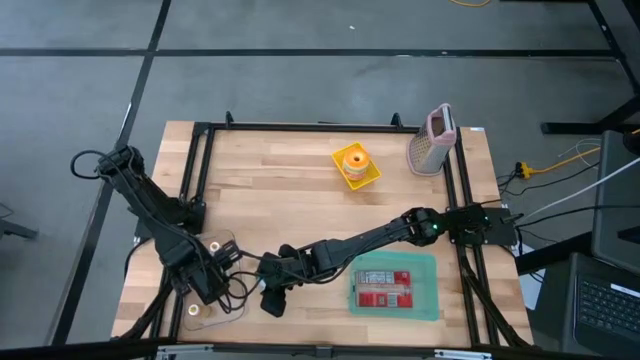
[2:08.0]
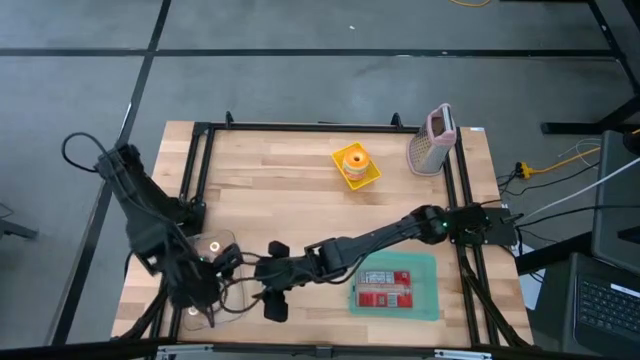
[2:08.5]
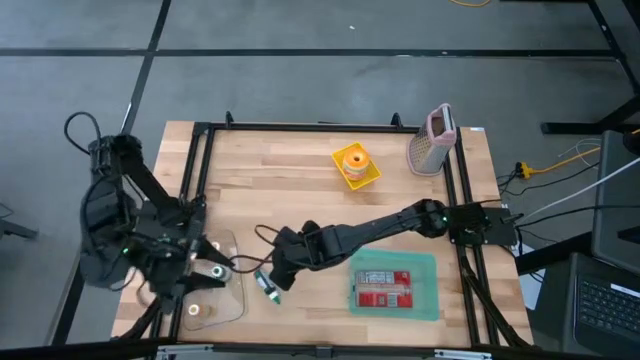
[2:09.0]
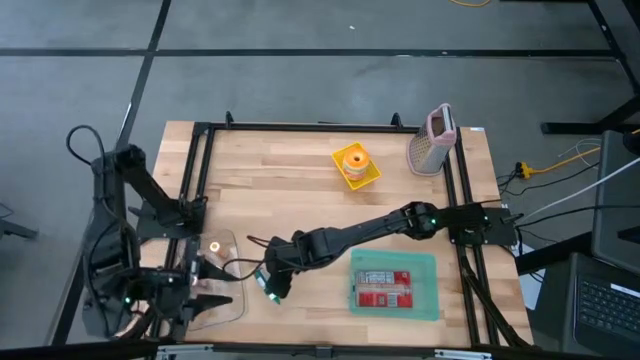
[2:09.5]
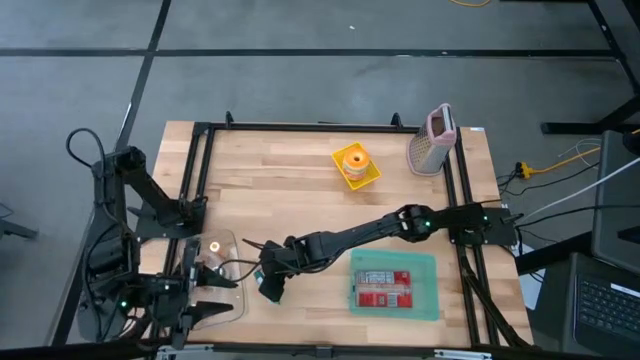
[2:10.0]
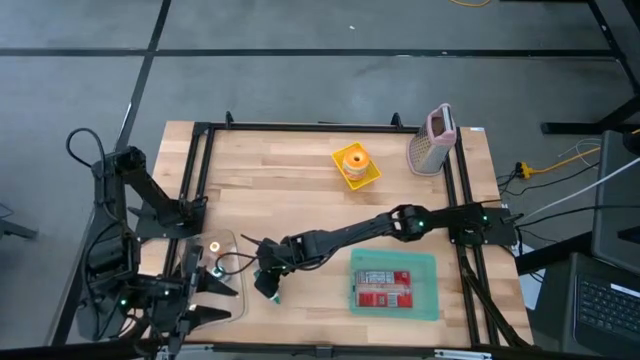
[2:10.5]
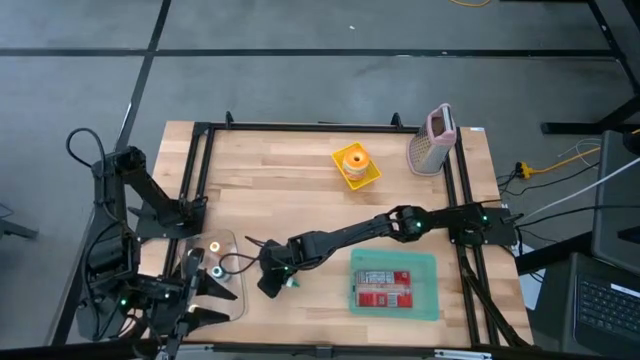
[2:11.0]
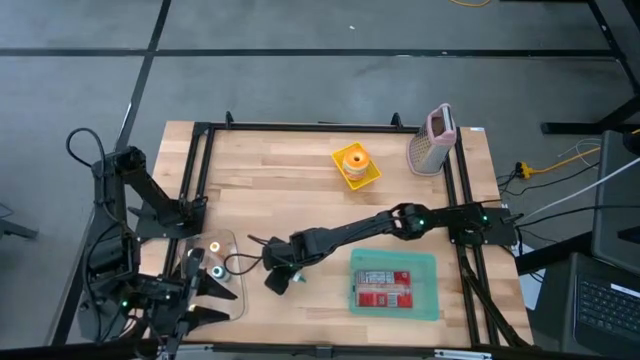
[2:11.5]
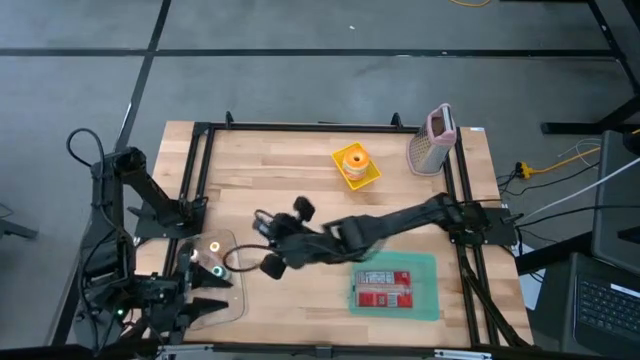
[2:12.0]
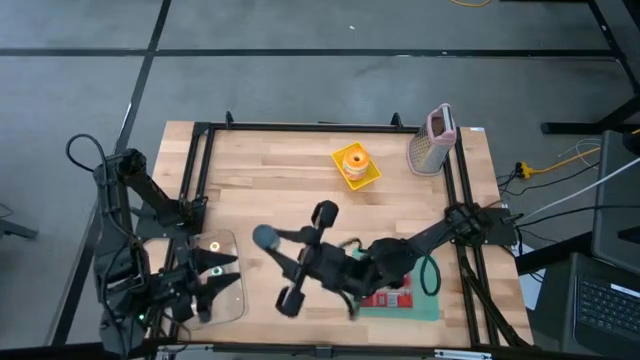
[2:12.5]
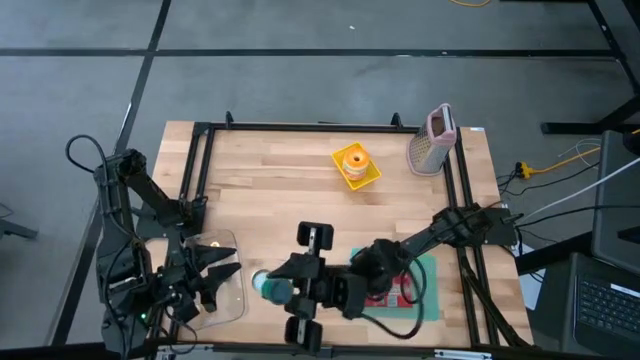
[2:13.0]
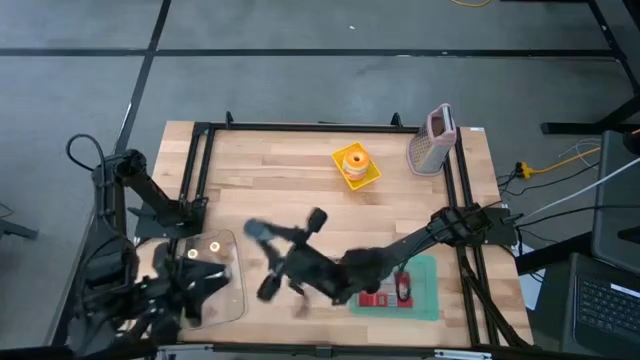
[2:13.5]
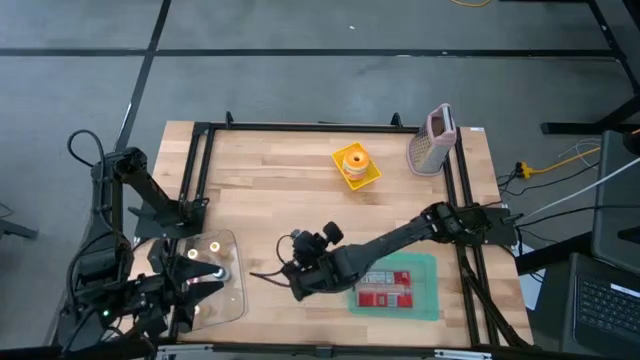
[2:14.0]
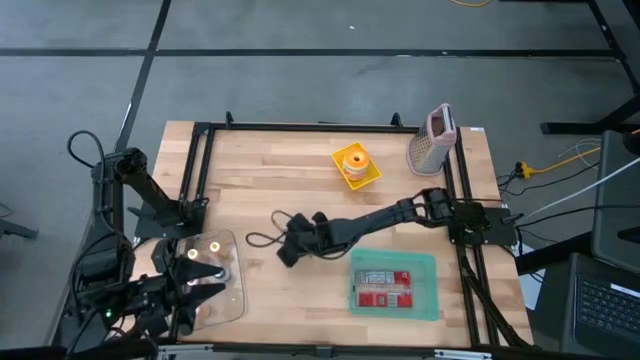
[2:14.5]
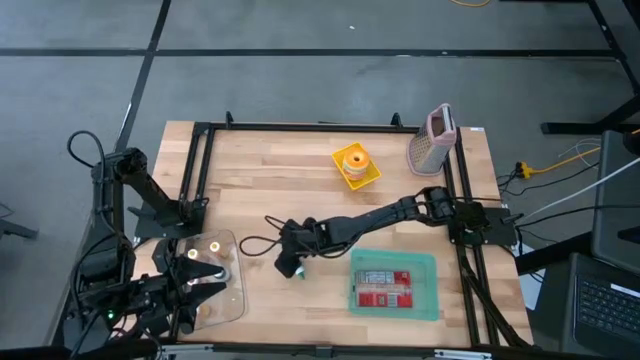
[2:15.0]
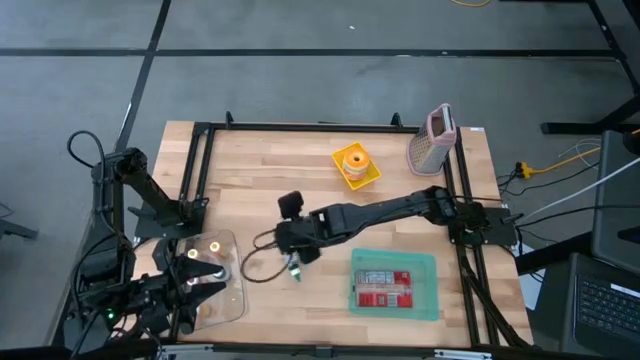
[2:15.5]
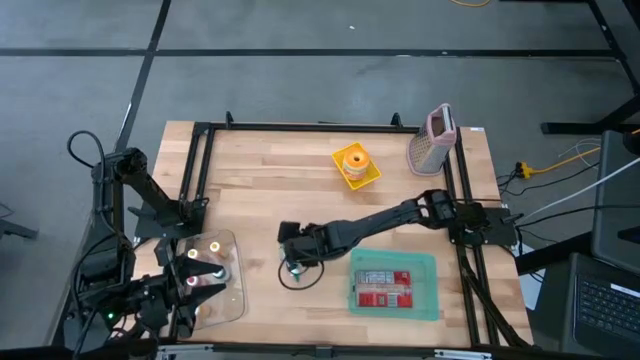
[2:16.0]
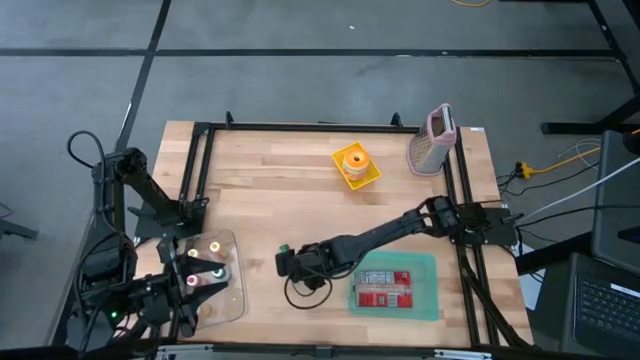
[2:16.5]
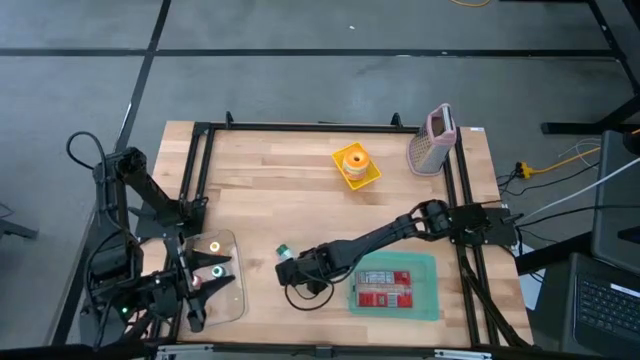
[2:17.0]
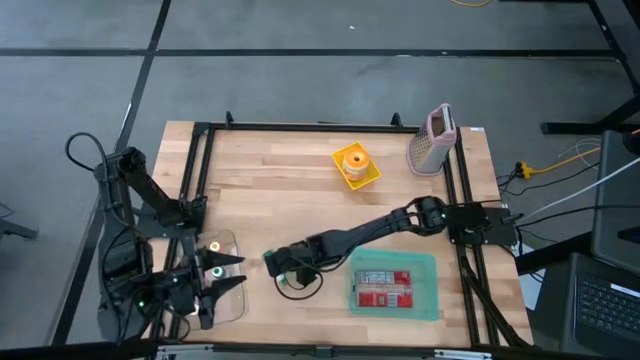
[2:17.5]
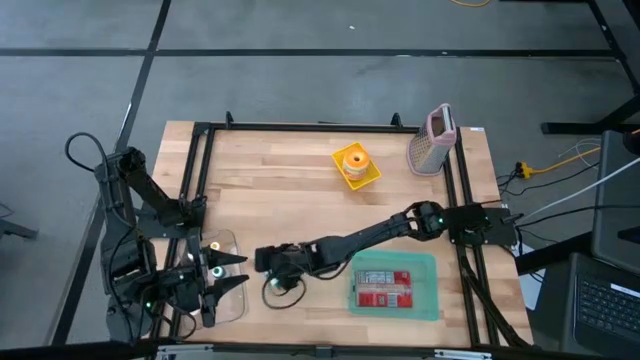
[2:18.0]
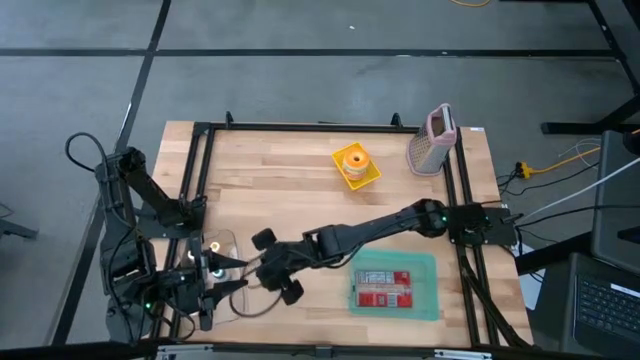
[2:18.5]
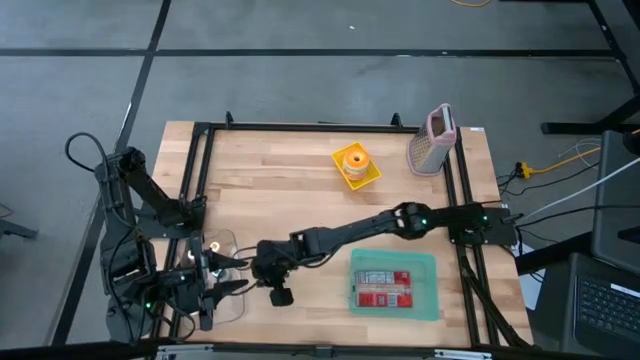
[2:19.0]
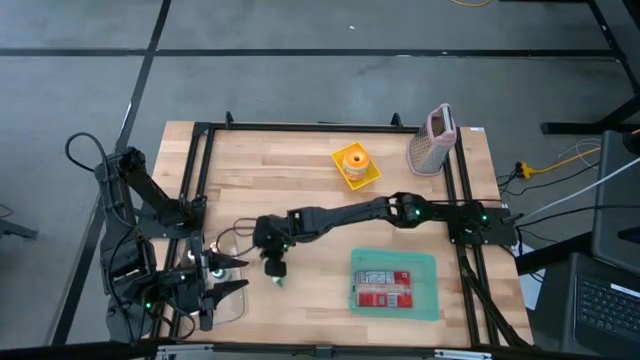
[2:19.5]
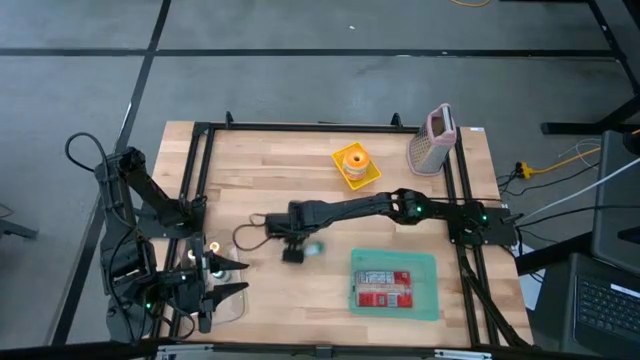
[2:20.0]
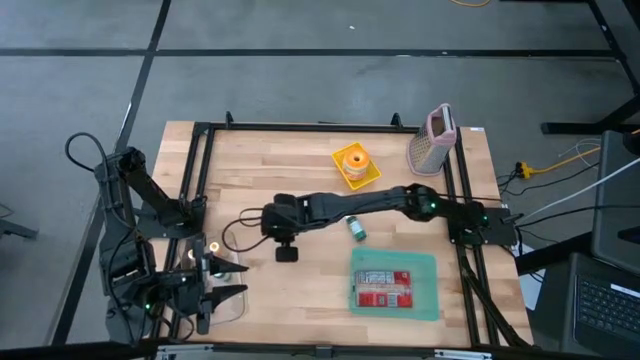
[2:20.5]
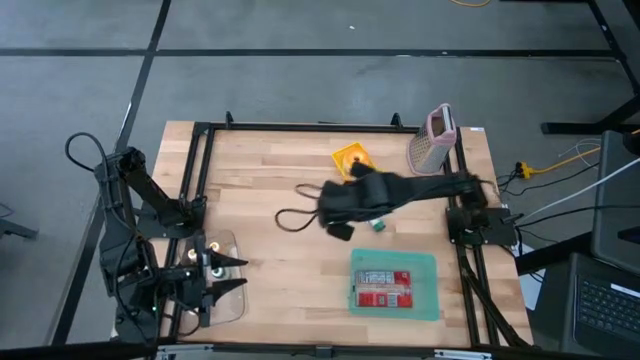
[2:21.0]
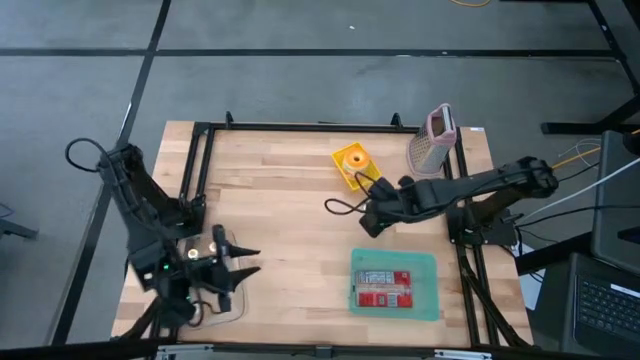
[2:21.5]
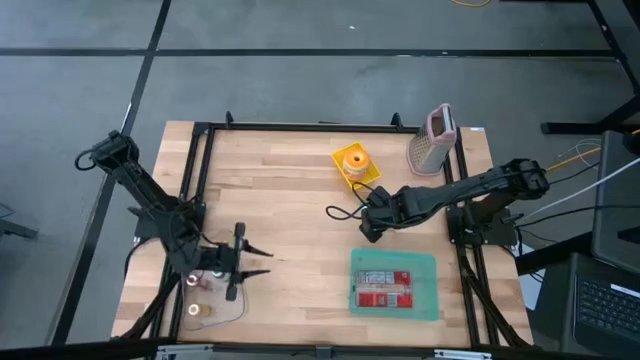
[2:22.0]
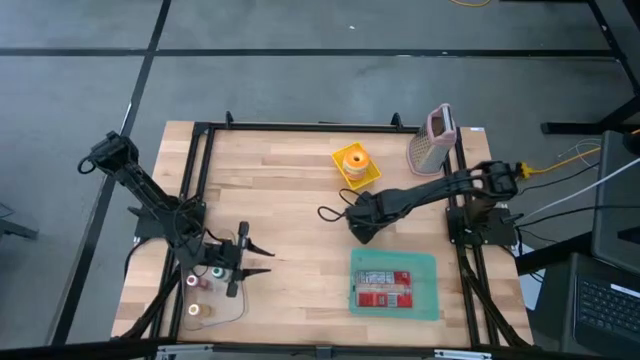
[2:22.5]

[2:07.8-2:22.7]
Put the green food coloring bottle into the transparent bin
